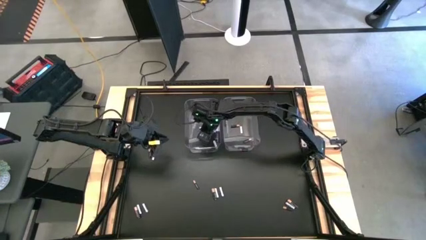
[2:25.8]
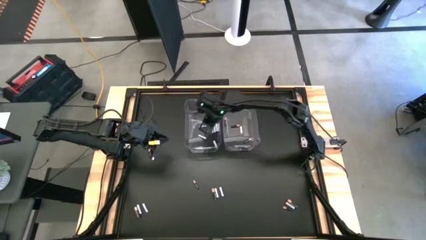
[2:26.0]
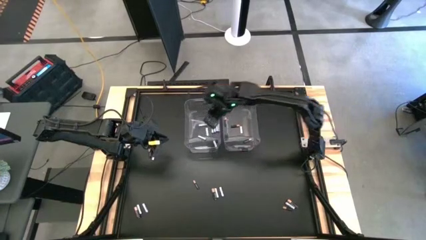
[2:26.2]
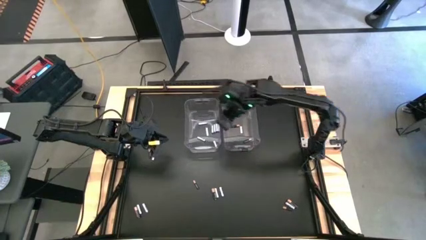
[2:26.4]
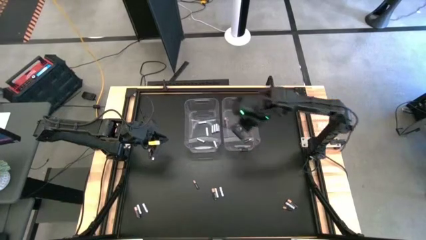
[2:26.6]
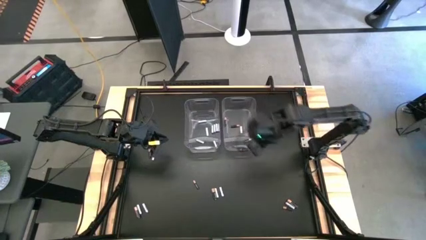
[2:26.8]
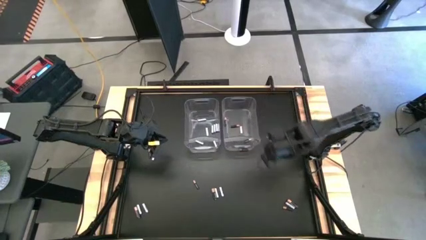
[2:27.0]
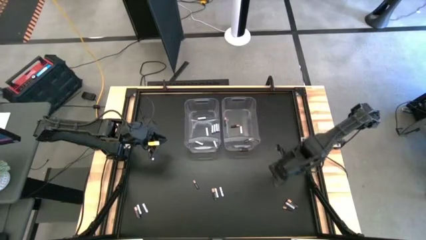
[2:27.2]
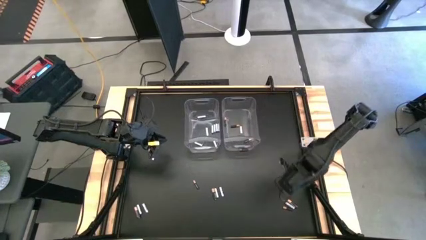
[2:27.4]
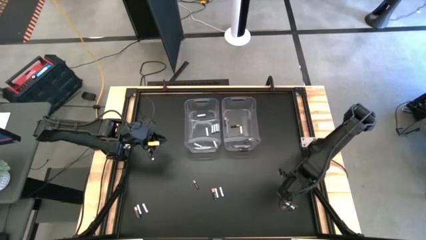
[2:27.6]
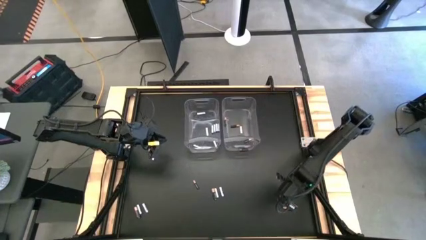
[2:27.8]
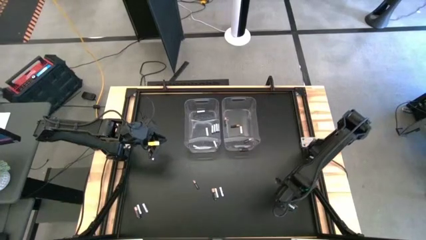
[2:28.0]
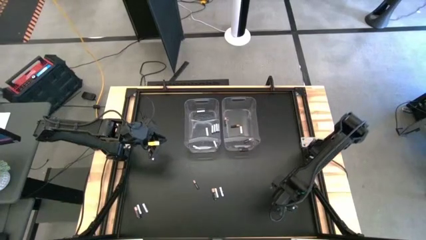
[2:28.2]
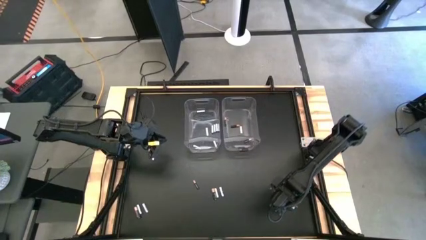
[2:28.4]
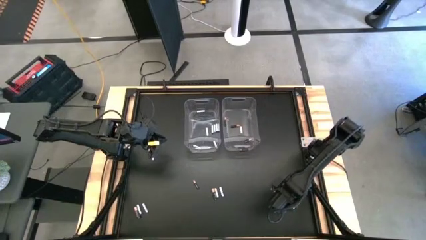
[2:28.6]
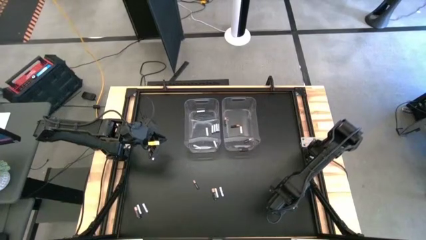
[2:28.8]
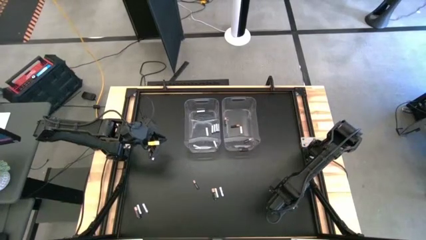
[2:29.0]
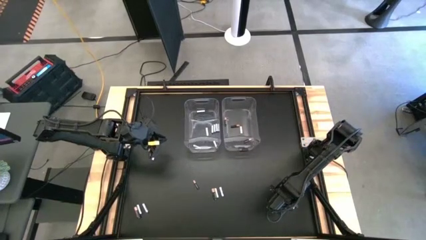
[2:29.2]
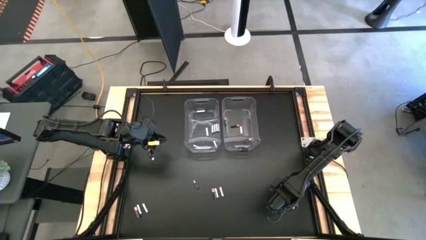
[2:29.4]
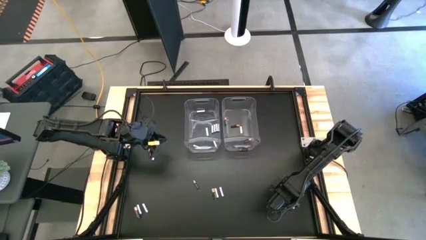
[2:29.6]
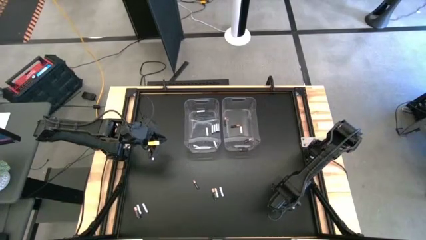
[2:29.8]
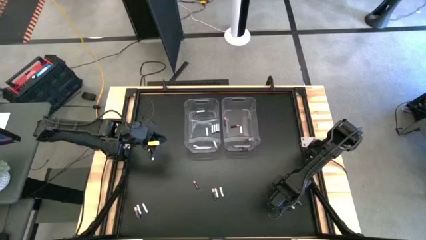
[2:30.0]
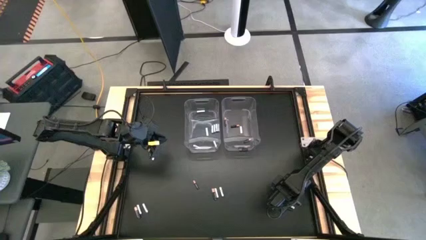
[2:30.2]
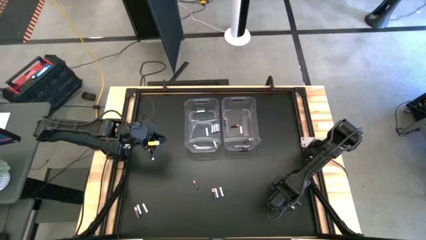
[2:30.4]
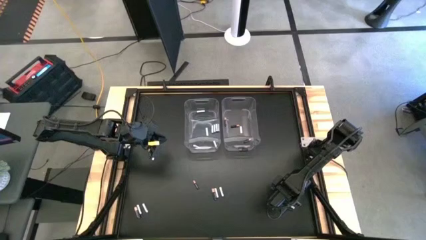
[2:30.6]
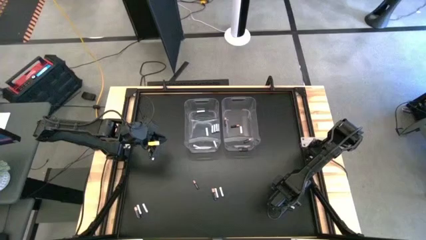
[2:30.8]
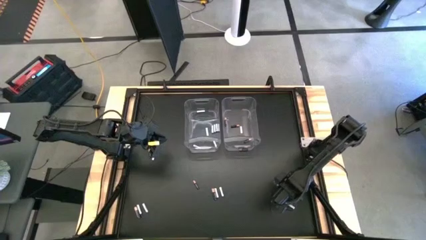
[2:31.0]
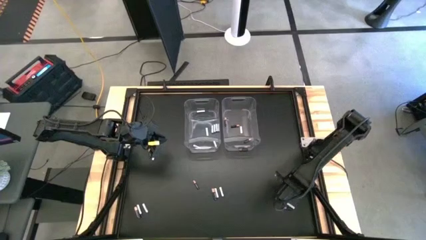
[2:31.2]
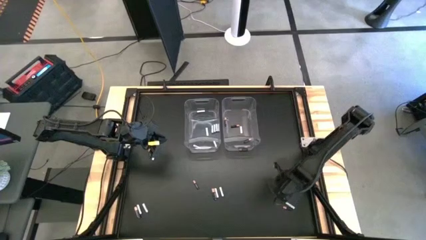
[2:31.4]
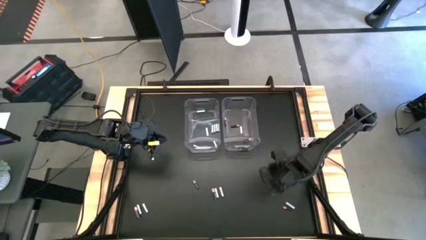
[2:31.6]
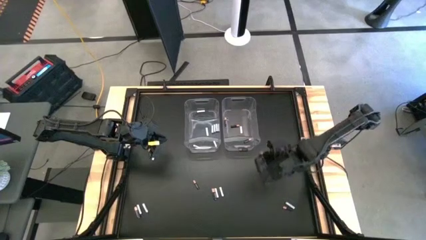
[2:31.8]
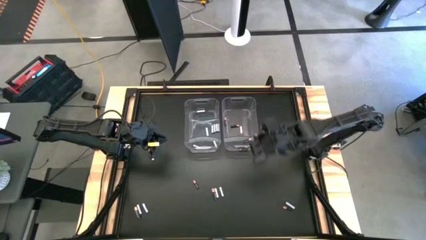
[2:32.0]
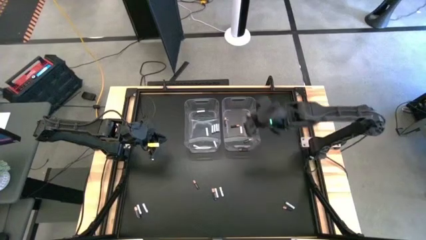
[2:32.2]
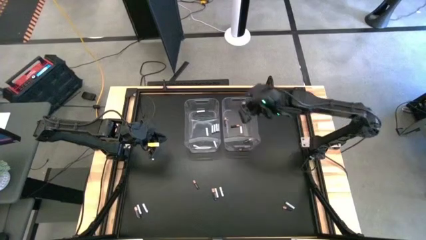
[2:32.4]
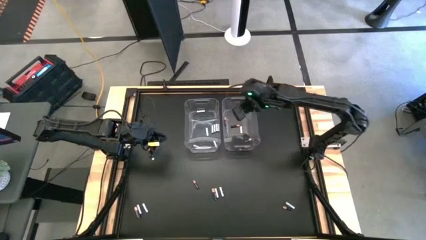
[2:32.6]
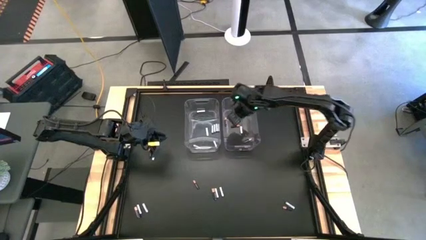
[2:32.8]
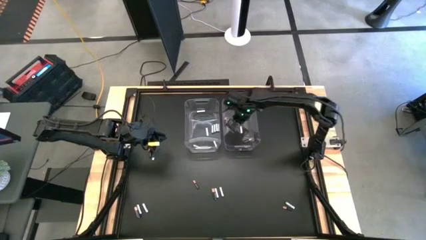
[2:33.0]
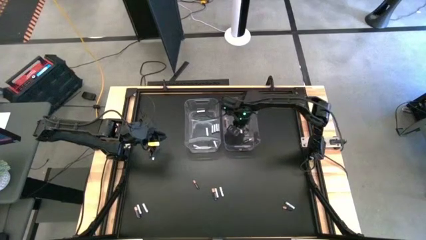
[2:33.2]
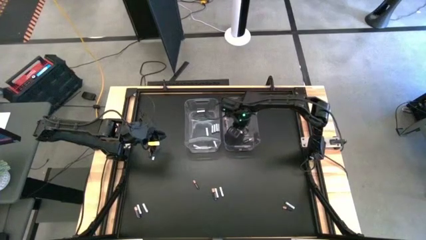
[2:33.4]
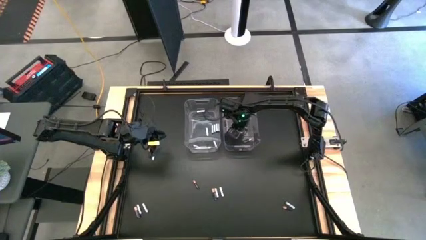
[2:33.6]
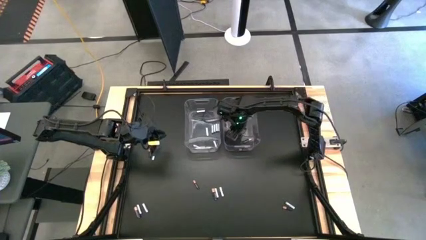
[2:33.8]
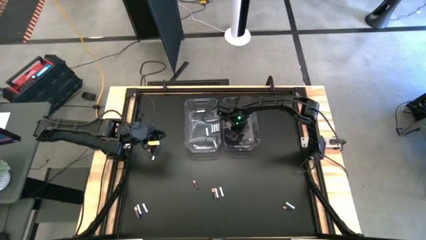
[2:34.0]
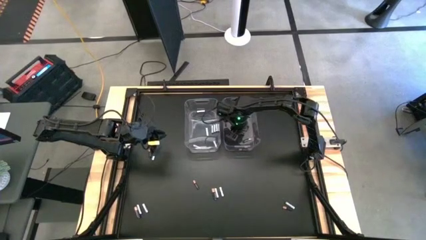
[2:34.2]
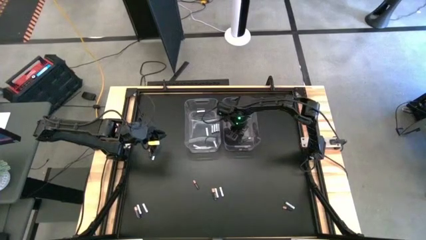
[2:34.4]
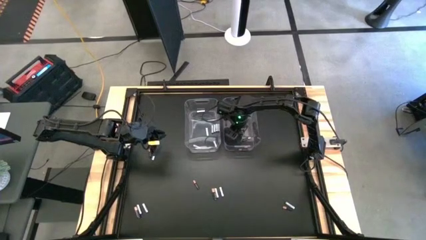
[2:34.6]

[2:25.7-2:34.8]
Task: Sort batteries
Put the black battery into the right transparent bin

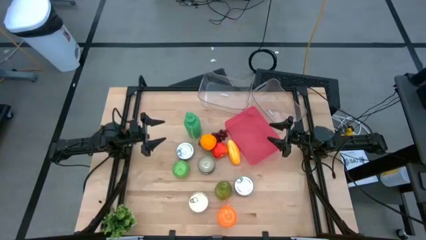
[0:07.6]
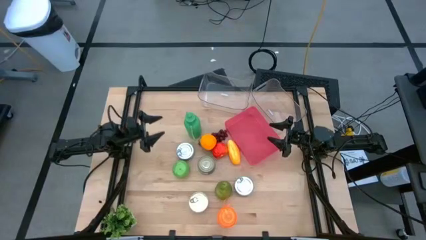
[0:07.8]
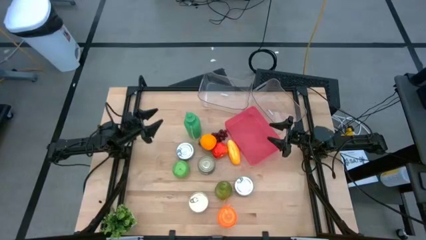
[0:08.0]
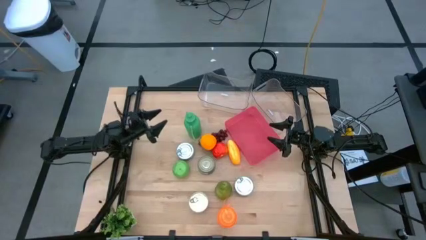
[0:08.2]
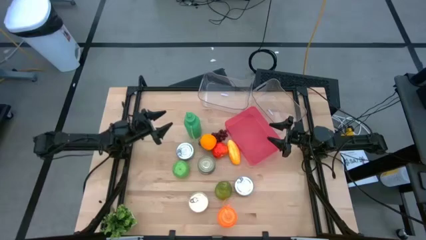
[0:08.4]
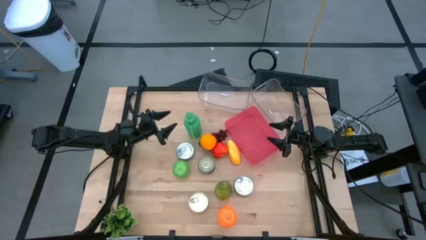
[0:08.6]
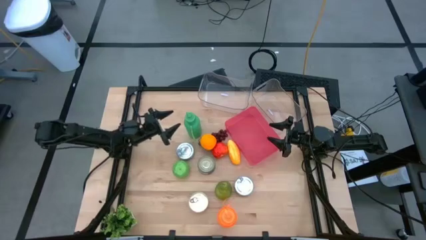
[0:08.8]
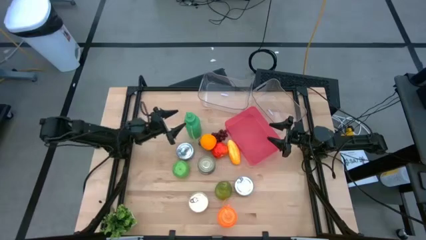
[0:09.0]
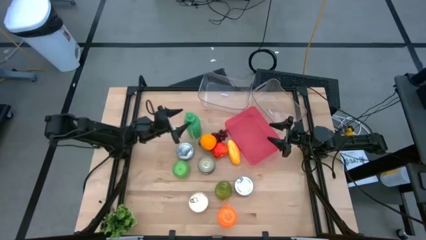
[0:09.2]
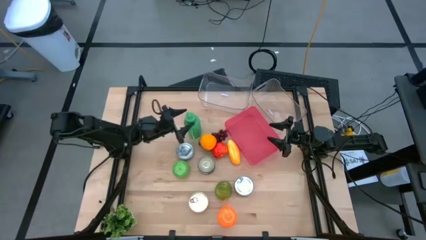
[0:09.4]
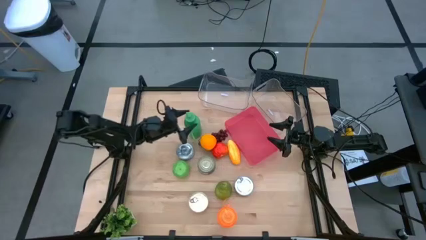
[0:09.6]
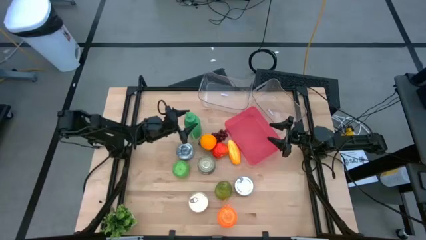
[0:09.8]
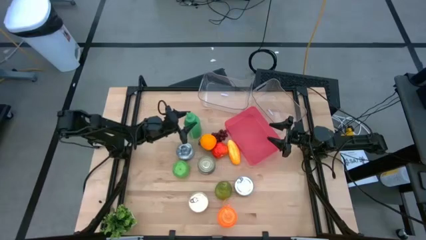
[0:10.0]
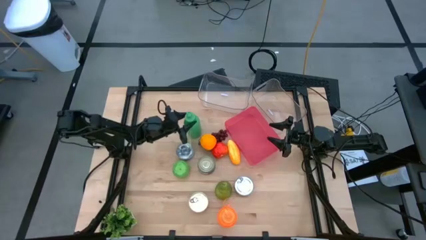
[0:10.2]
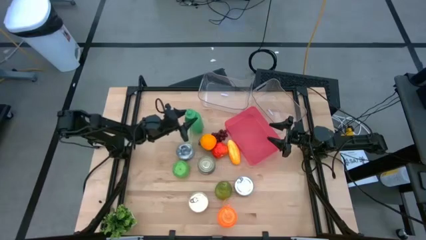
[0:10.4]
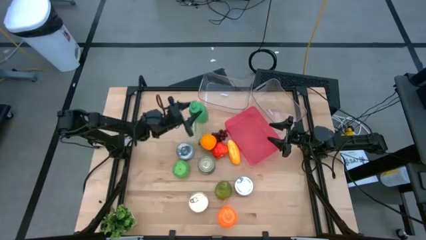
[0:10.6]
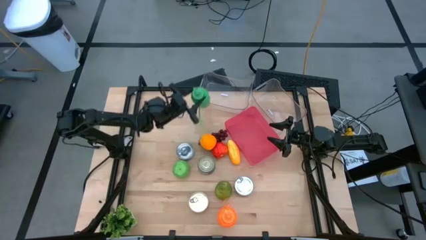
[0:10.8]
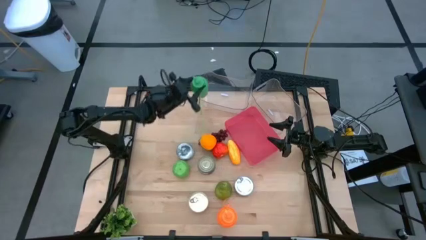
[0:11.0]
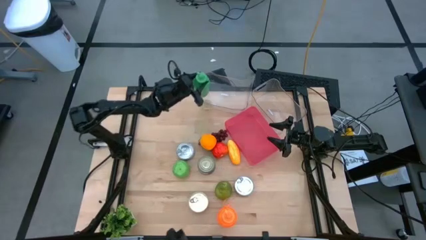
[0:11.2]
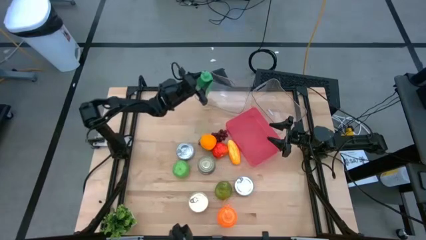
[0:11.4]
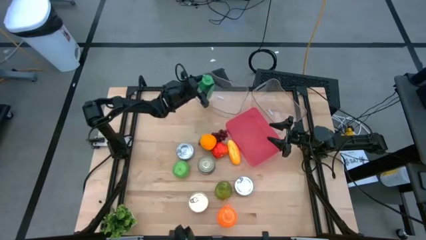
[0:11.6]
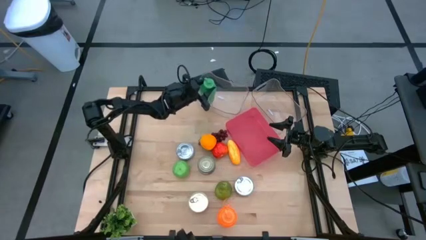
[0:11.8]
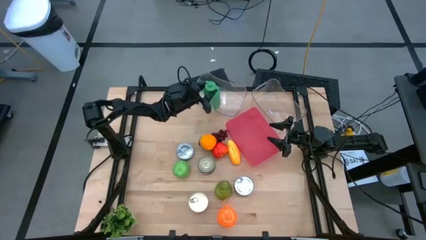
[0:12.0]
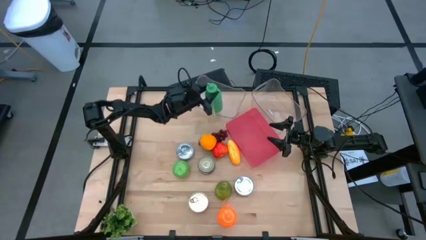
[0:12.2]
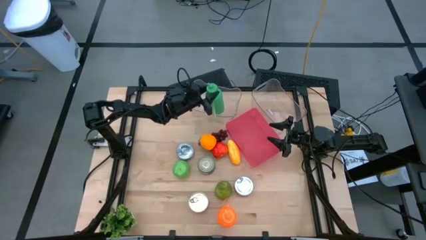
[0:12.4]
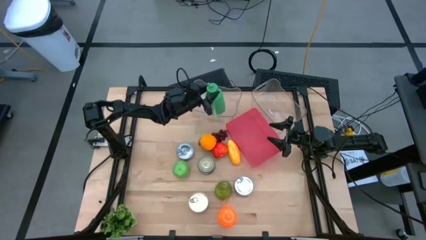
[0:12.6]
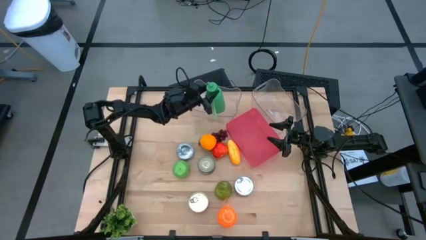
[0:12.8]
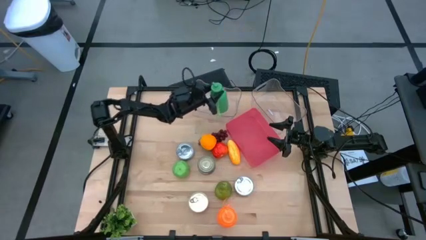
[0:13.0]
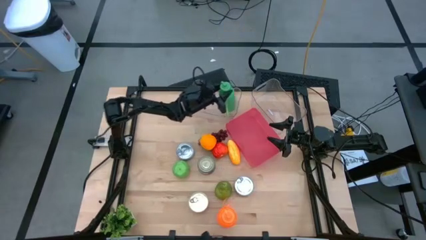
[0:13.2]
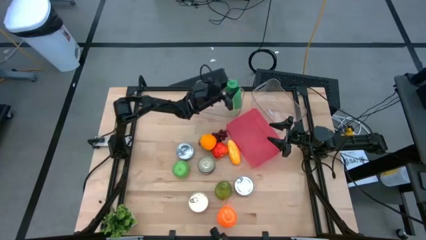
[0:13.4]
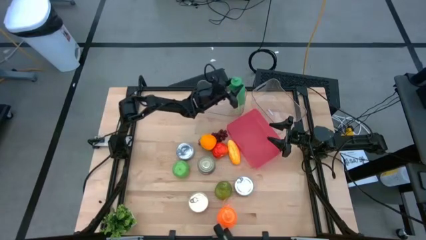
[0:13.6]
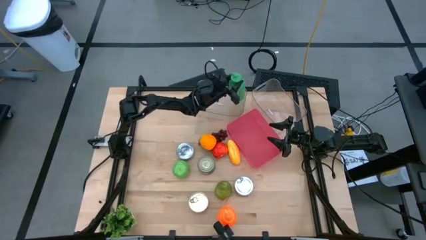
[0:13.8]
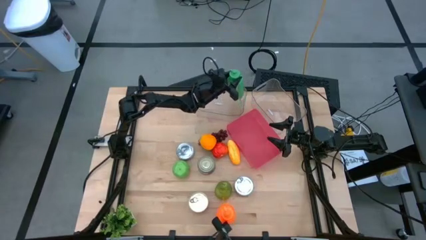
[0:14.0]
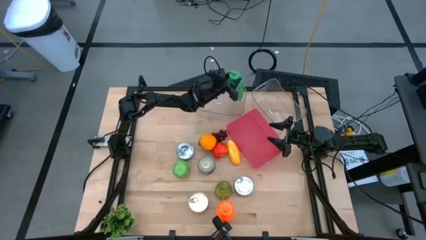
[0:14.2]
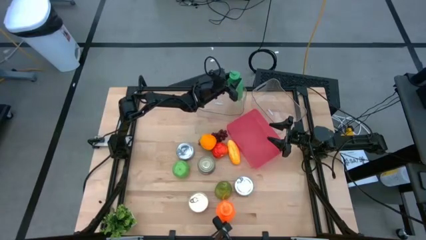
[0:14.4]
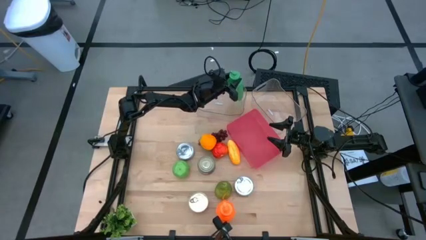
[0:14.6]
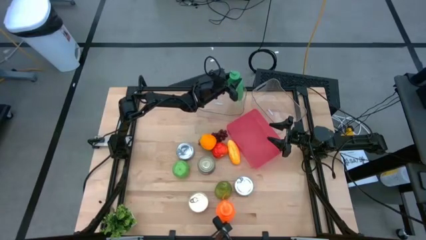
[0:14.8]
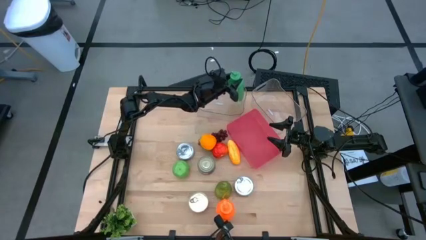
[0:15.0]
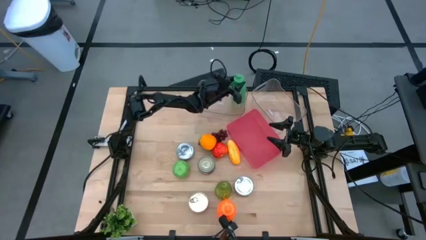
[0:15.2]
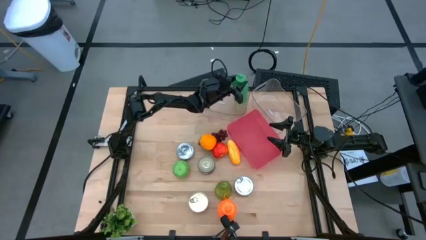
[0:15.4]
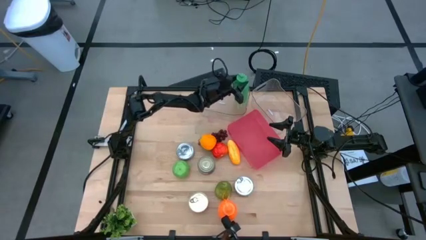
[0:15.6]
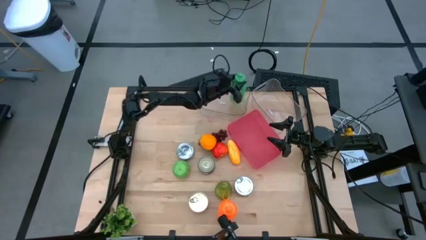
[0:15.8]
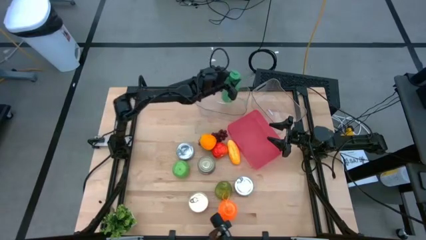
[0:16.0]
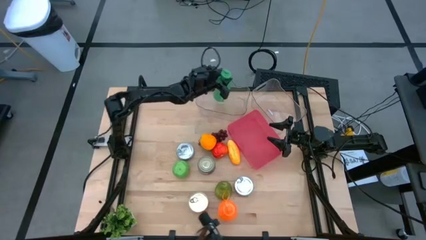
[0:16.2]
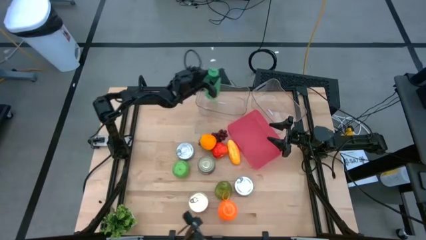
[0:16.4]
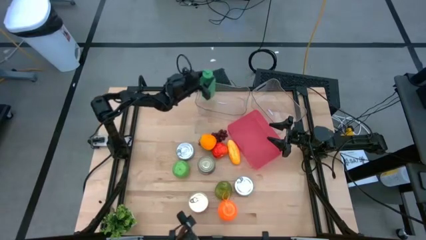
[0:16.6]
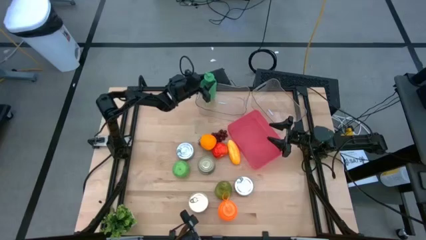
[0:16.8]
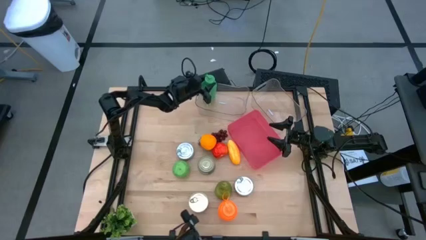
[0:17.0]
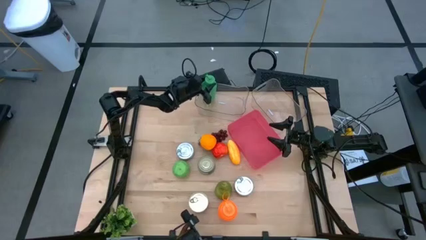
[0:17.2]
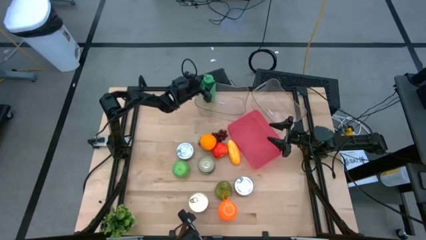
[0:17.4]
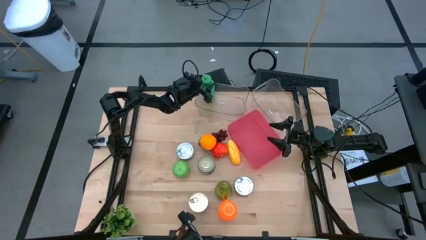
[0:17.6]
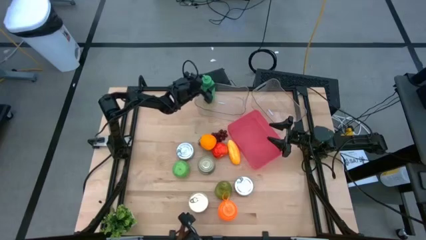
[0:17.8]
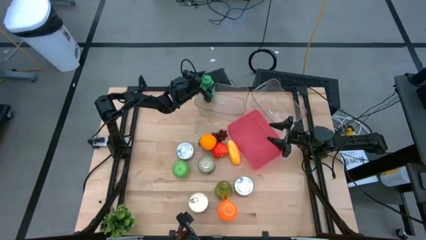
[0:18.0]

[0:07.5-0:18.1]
Task: Pick & Place Food Item
Put the green water bottle into the left transparent bin
